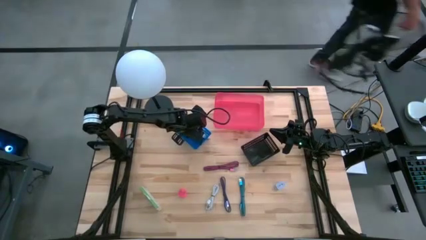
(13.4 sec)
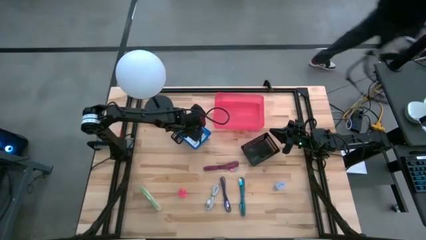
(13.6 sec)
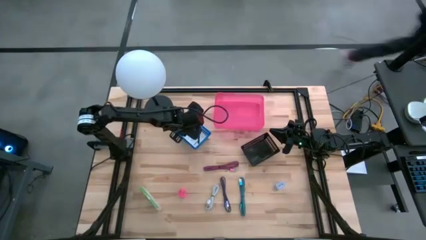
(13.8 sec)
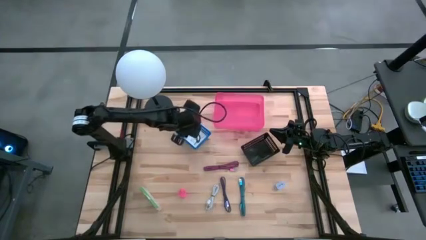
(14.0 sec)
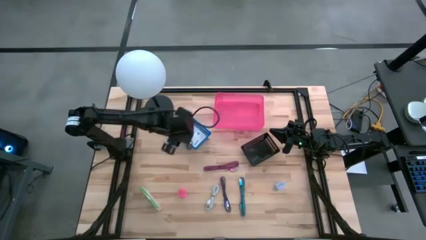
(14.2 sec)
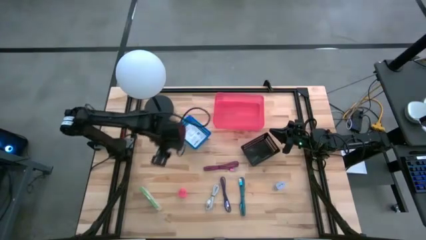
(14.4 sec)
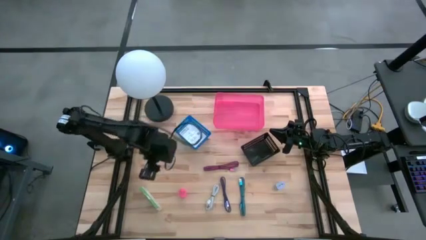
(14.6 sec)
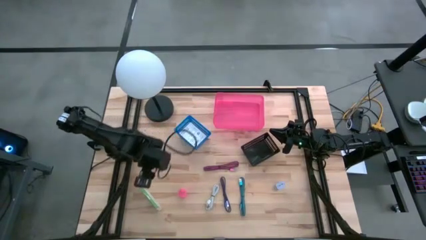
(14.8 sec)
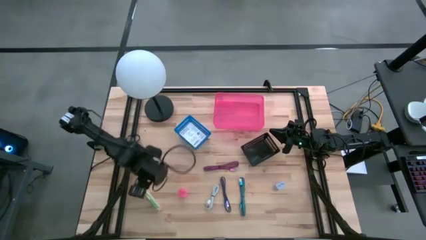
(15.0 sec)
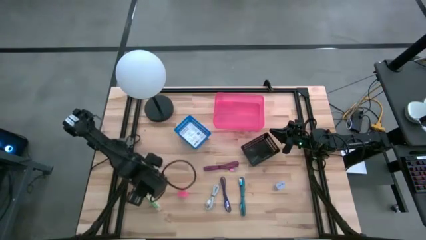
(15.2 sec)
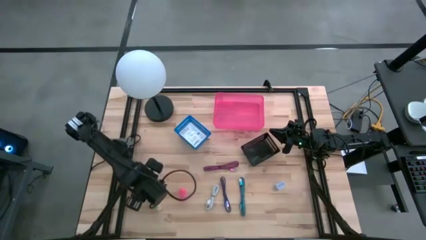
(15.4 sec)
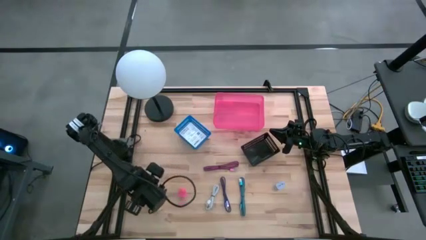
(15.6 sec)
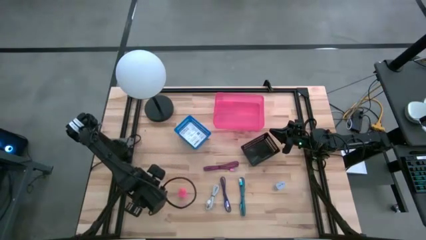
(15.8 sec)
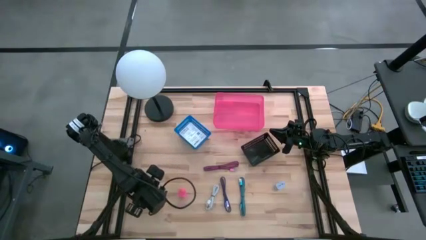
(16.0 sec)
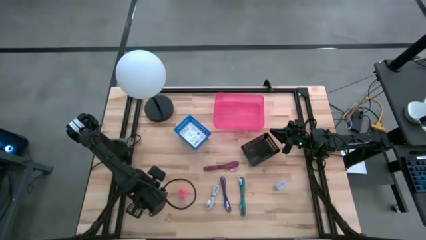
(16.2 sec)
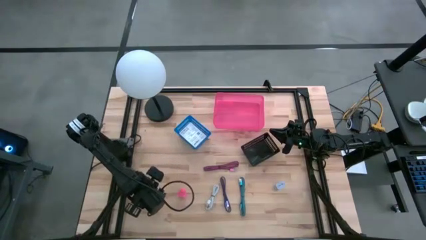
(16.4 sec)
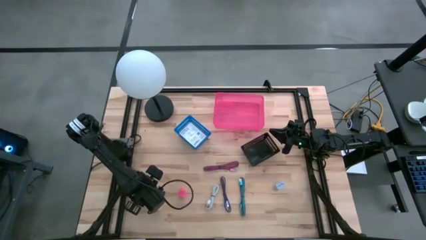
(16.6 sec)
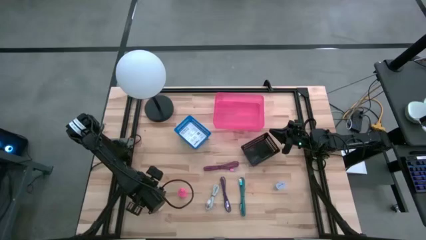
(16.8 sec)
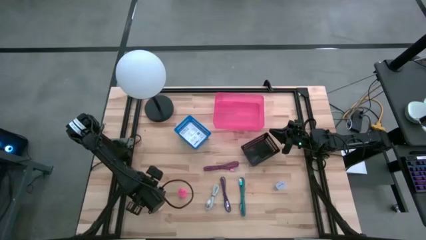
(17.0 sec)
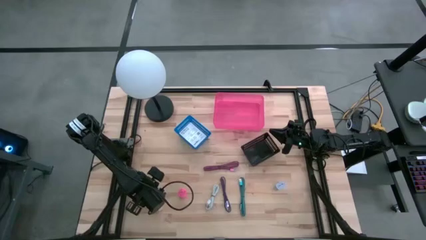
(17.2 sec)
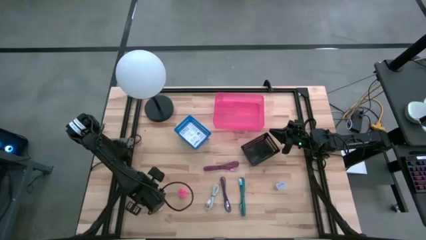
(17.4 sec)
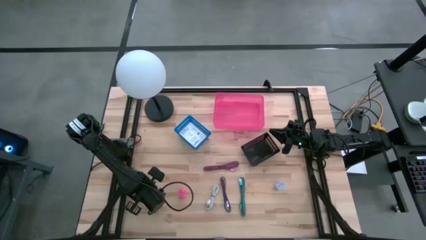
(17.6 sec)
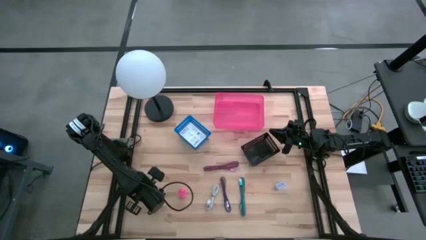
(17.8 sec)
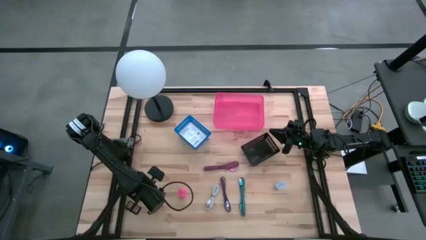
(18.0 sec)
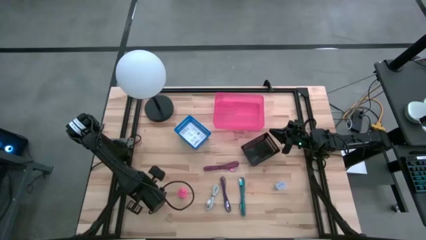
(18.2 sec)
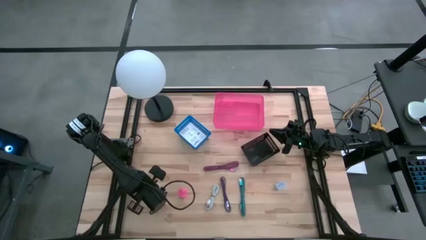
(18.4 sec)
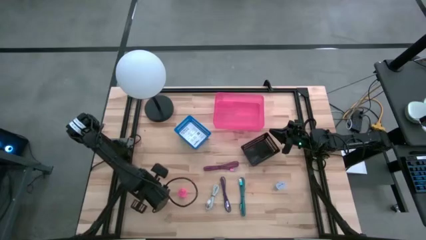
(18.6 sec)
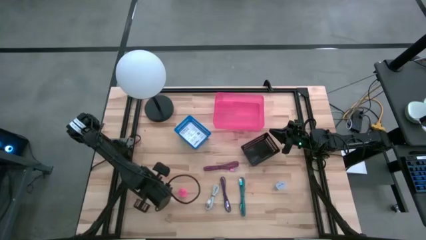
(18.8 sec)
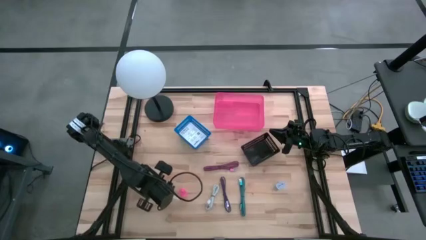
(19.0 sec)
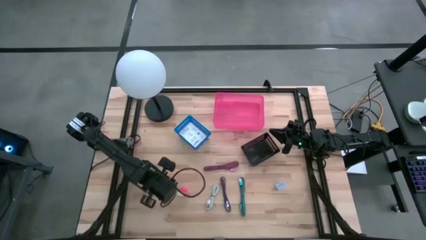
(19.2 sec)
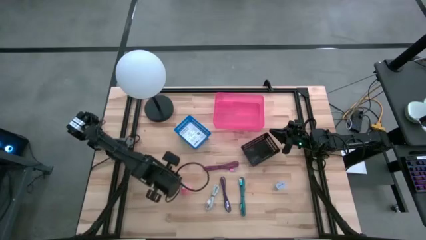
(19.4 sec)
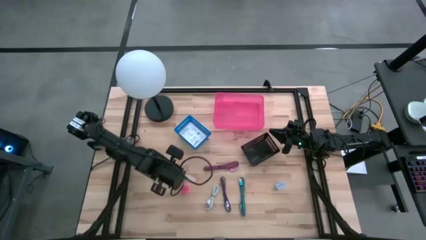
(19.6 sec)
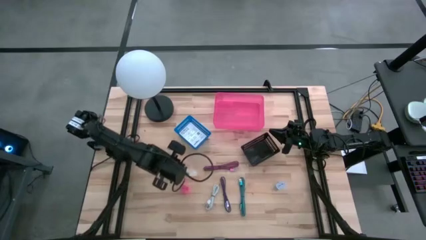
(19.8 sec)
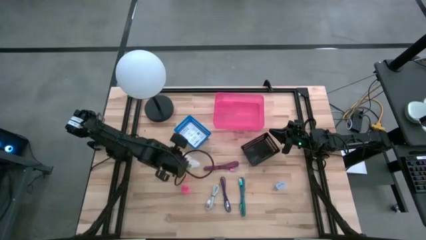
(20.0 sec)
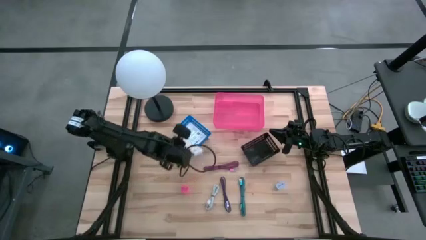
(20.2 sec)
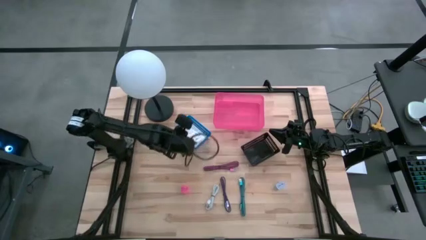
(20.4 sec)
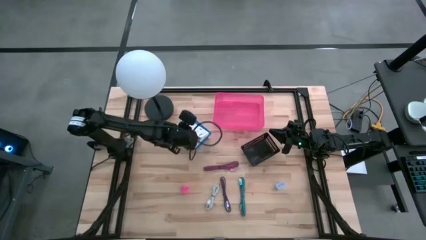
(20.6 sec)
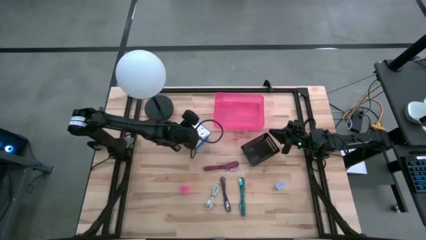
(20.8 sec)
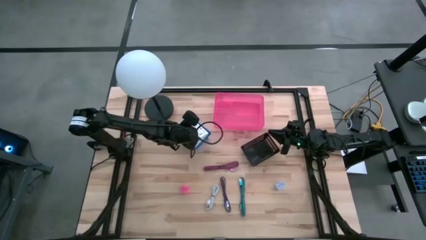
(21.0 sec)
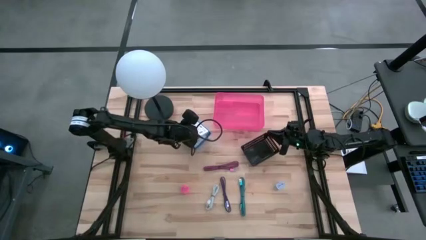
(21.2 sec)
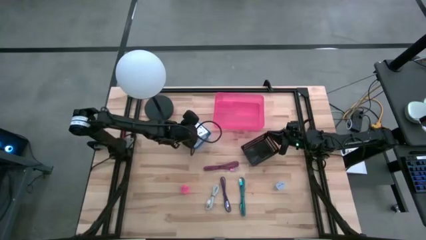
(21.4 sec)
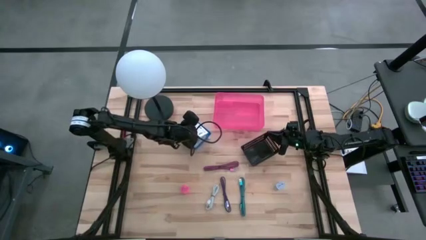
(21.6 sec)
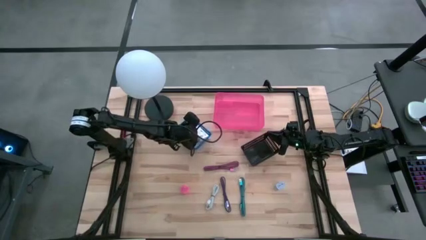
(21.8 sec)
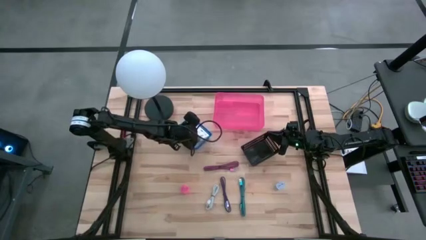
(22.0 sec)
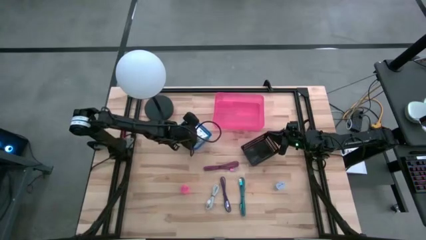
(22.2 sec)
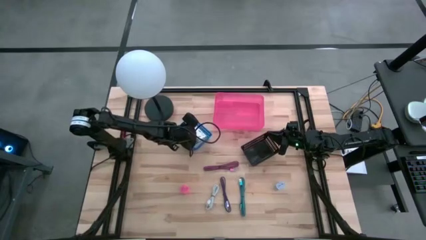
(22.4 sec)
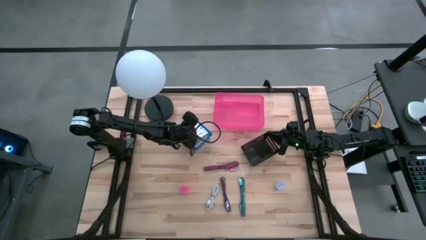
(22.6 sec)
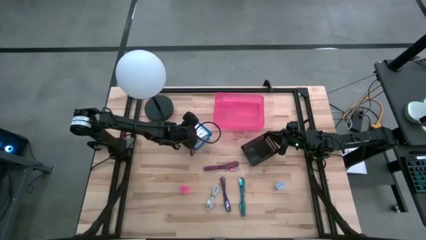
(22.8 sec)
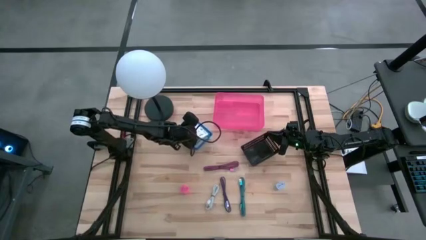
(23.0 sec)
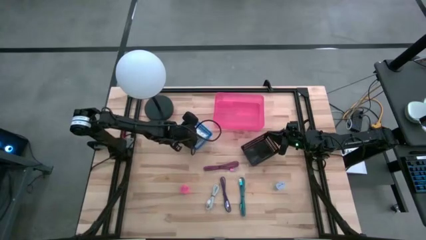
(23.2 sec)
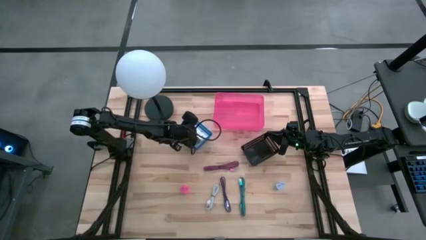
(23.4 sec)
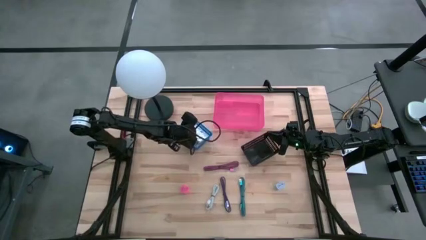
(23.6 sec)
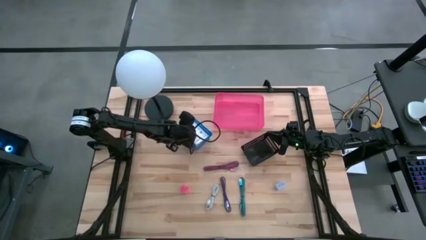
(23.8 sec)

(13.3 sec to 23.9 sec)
Task: Pick and place items into bin
Put the white card reader box into the blue bin

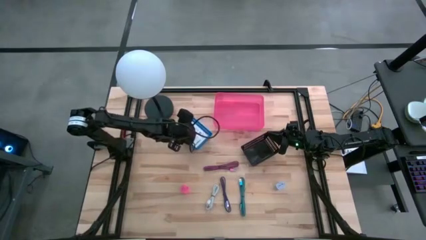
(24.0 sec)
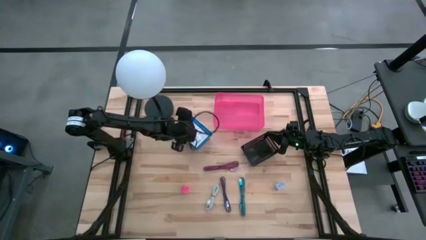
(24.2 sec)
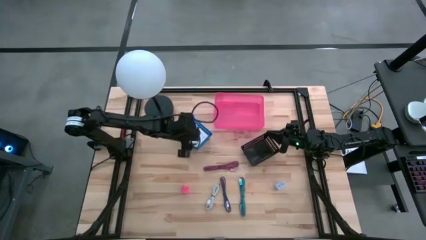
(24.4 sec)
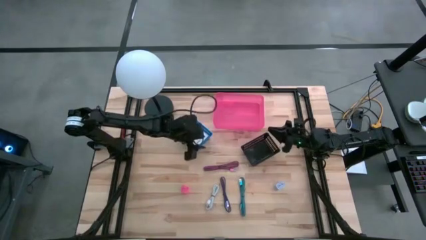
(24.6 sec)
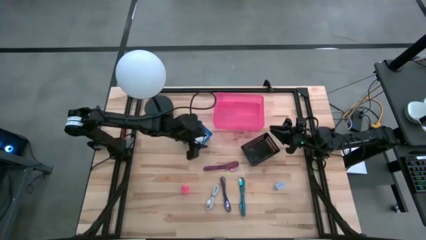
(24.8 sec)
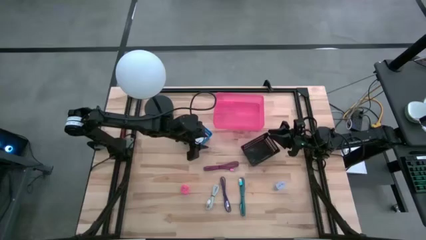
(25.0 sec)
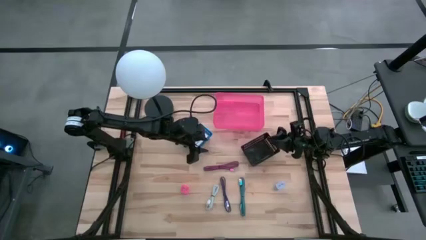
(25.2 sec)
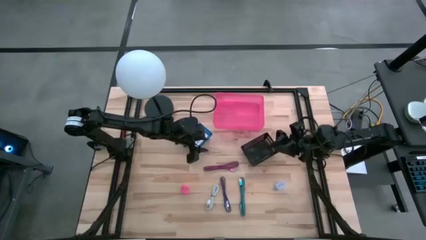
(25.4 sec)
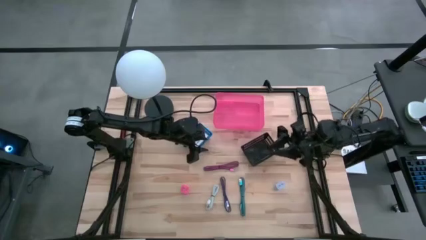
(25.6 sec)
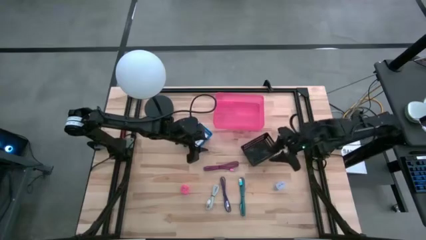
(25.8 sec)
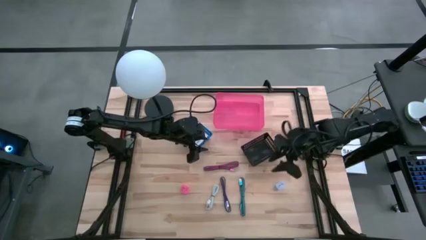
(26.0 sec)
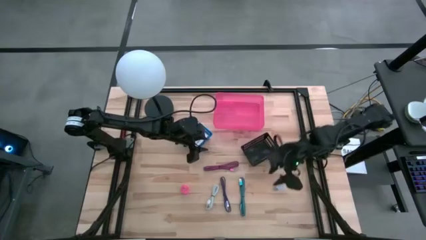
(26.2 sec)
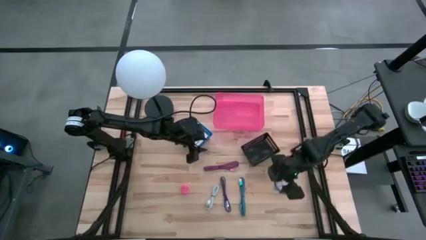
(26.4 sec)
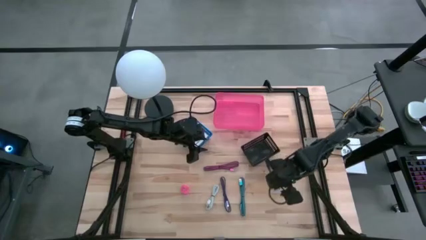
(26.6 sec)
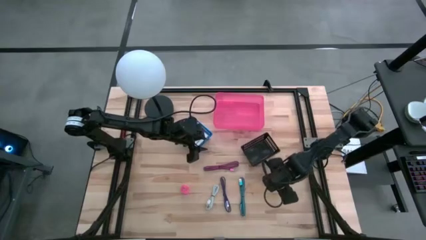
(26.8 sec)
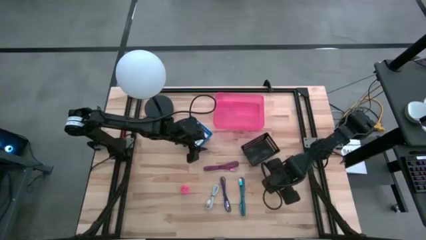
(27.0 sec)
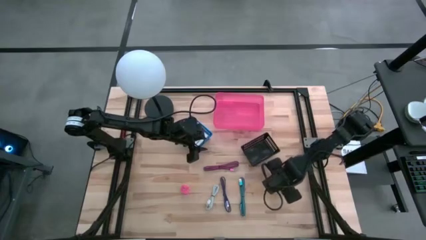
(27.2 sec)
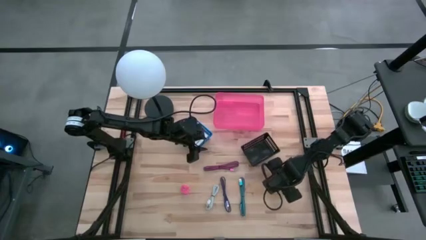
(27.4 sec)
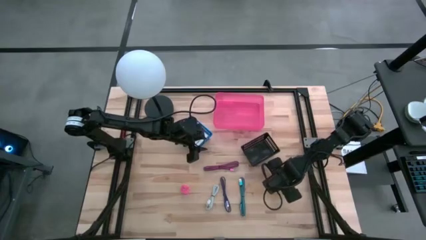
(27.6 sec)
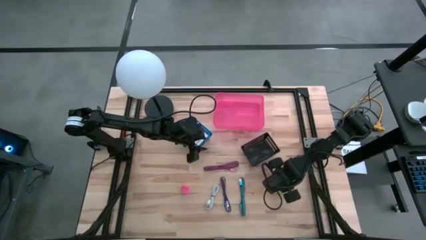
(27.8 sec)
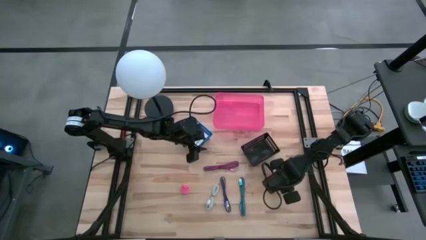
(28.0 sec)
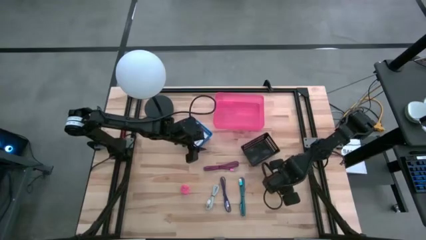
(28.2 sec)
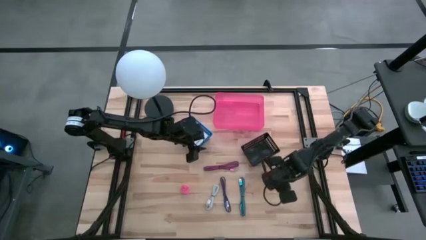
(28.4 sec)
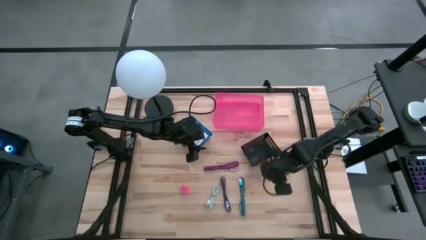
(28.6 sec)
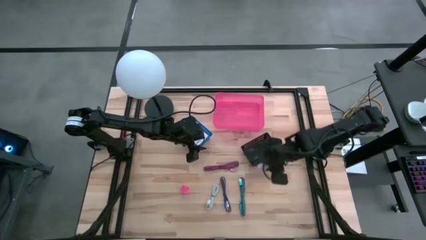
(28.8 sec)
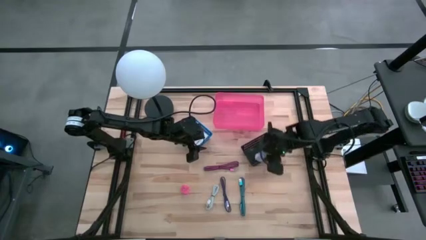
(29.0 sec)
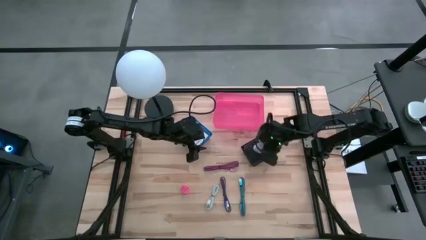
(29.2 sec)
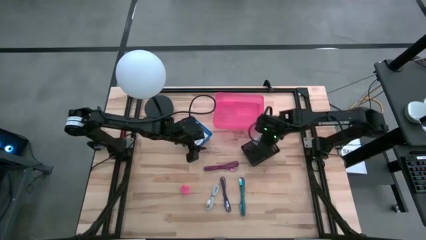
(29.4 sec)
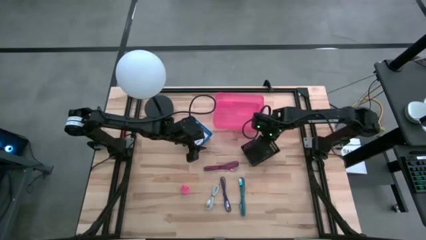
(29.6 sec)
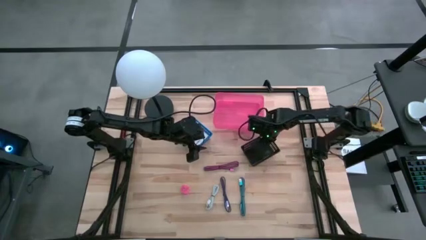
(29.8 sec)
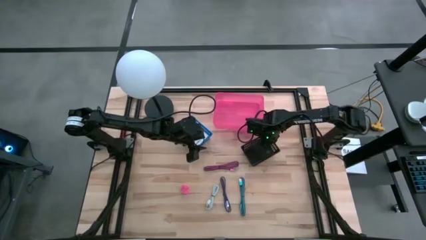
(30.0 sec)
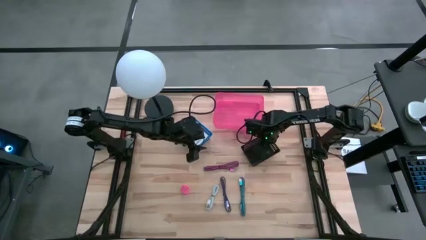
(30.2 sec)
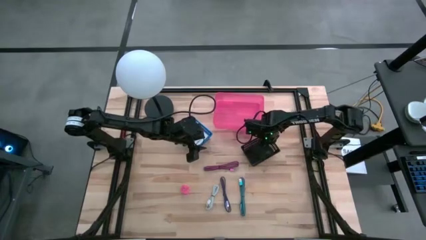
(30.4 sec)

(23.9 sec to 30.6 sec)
Put the white charger adapter into the black bin
